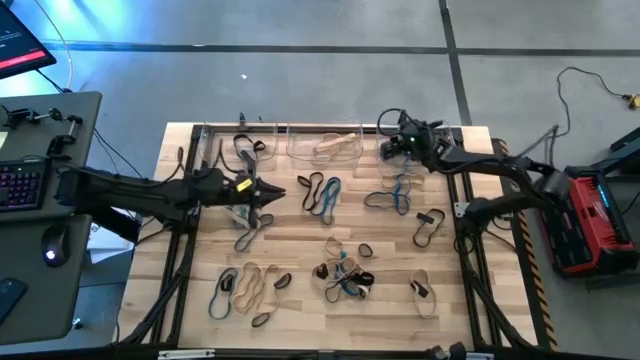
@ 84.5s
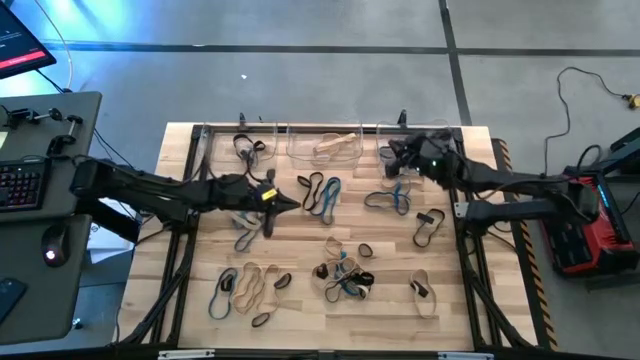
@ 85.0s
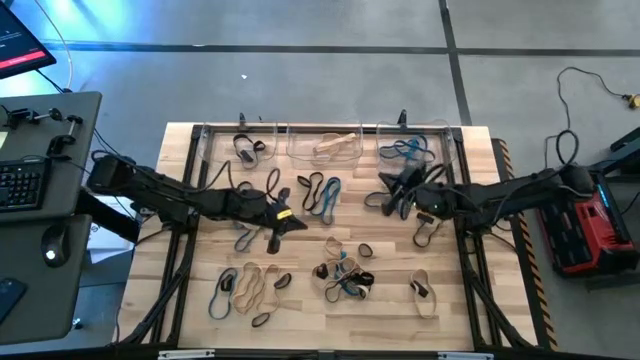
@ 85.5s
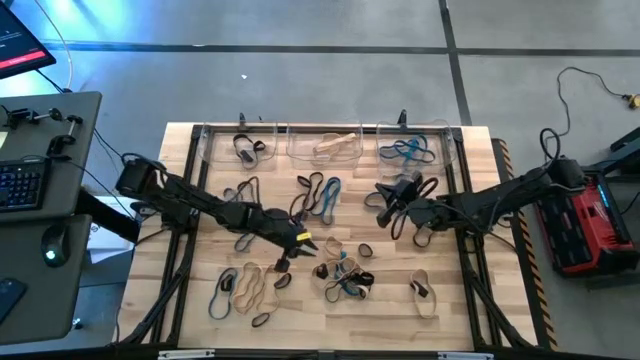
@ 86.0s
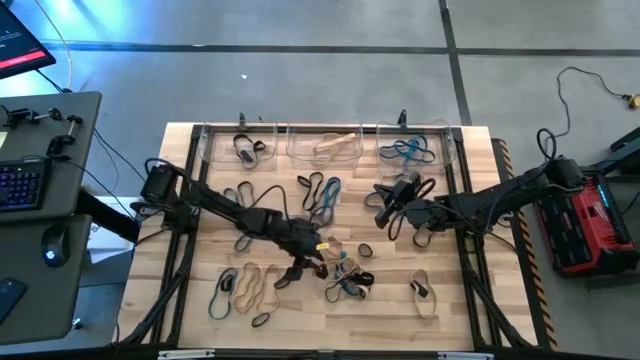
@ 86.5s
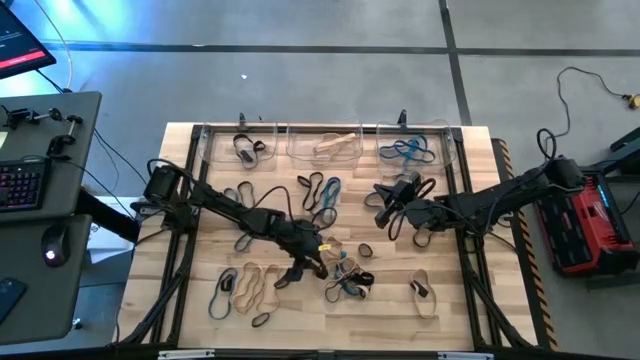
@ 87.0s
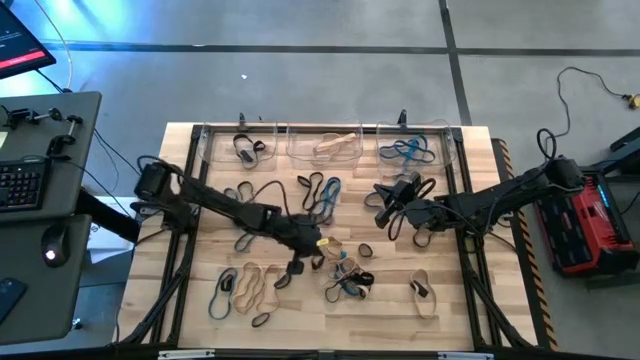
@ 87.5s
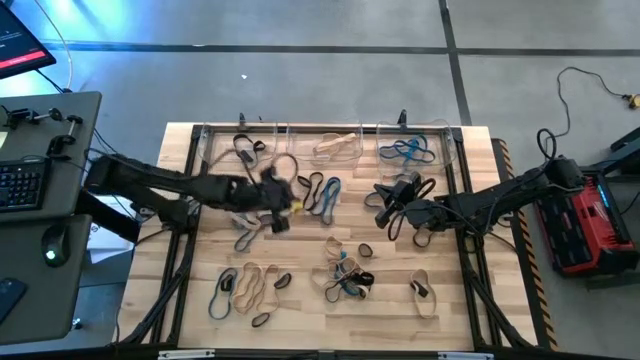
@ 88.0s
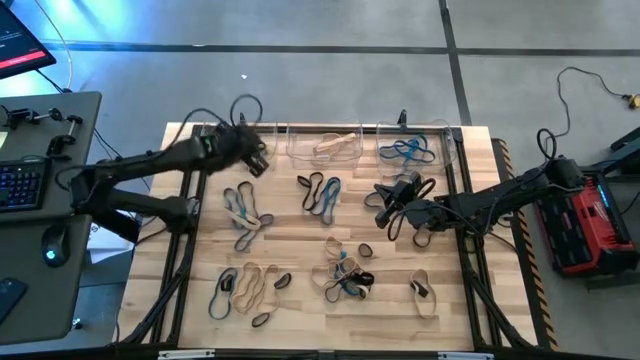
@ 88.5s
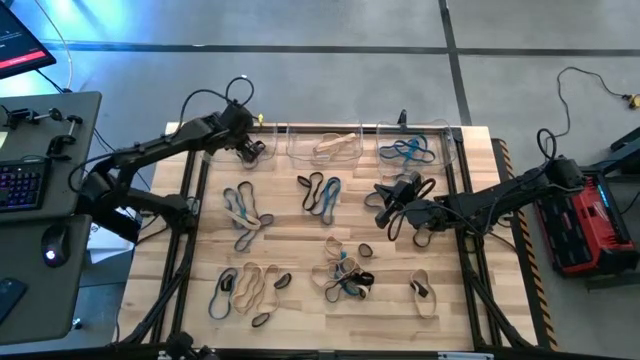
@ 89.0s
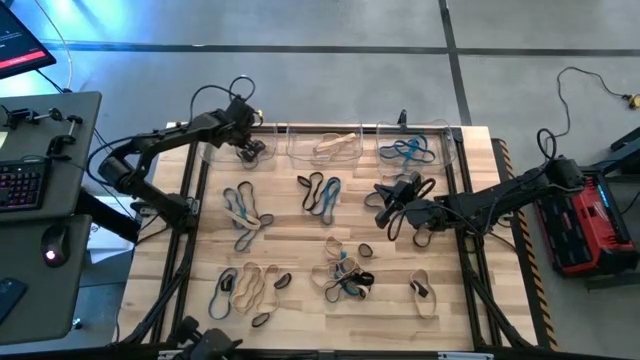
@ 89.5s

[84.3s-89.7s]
Task: Sort rubber bands into baskets
Put the black rubber band into the left transparent bin

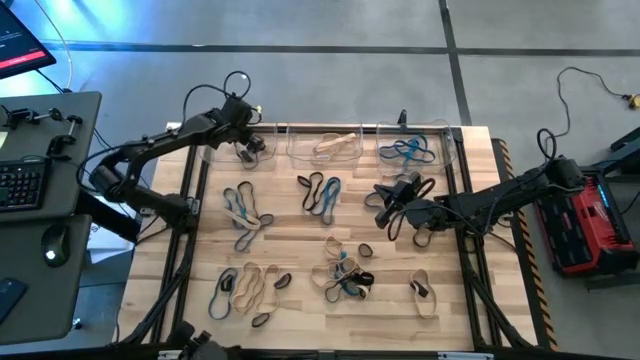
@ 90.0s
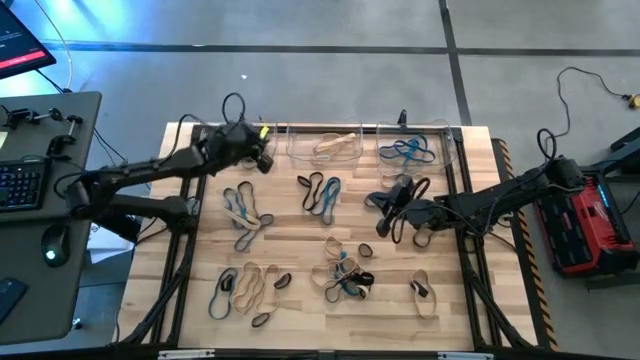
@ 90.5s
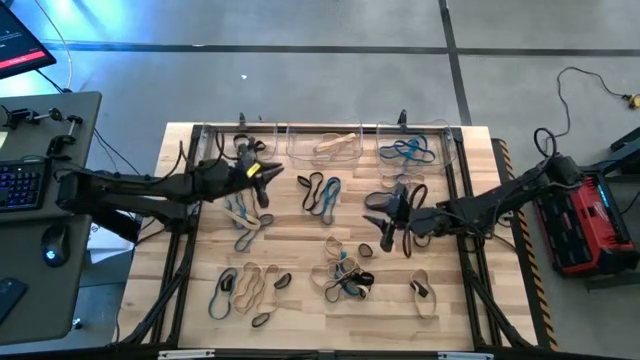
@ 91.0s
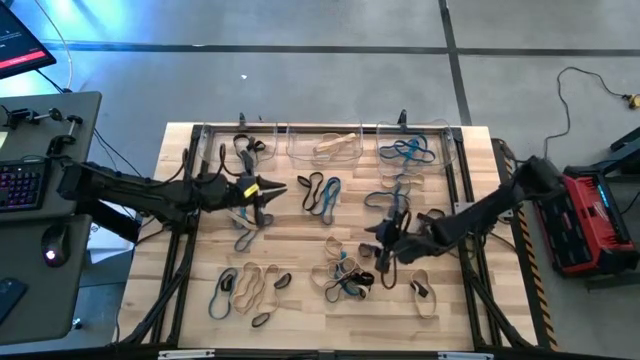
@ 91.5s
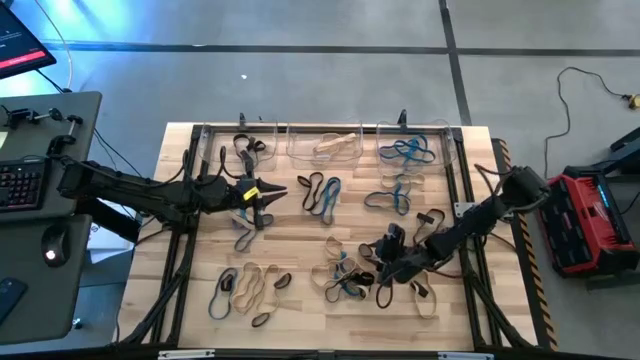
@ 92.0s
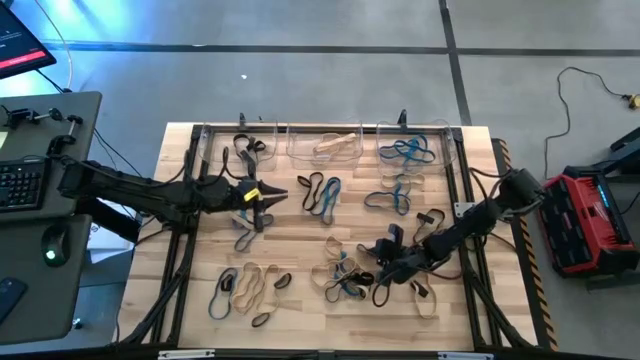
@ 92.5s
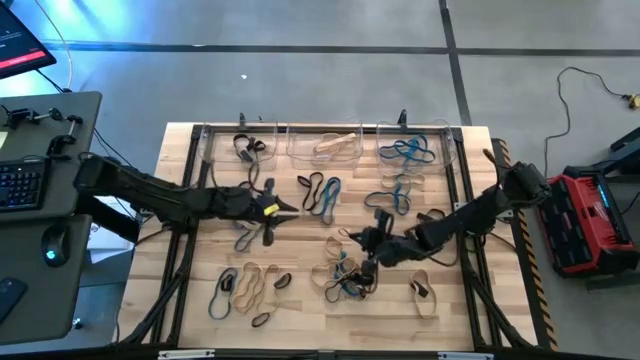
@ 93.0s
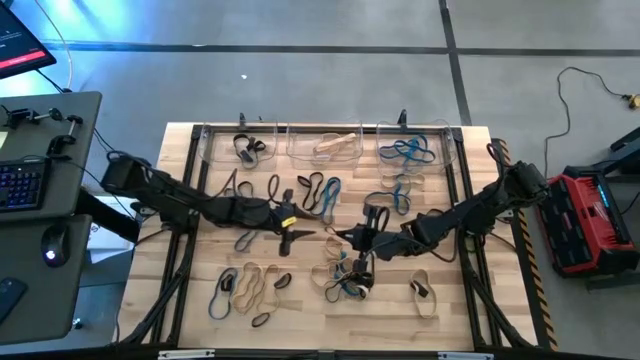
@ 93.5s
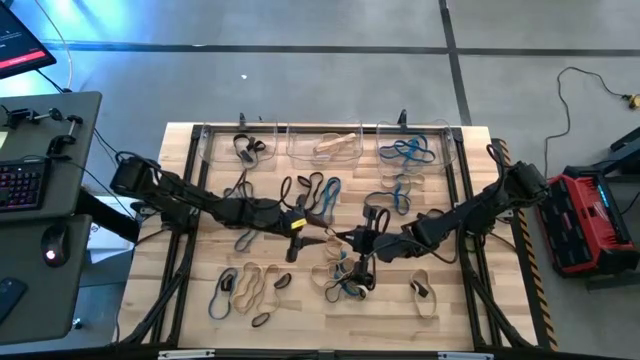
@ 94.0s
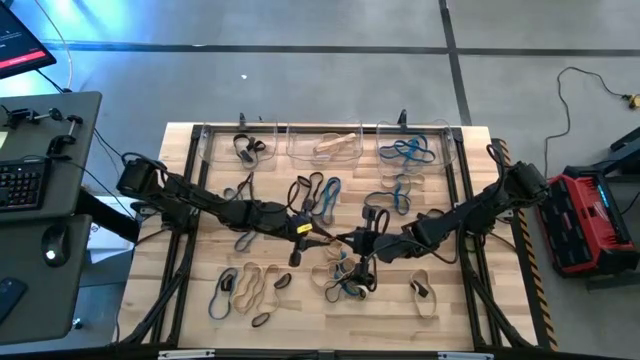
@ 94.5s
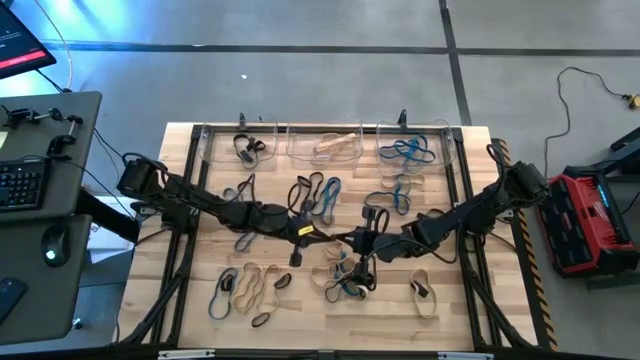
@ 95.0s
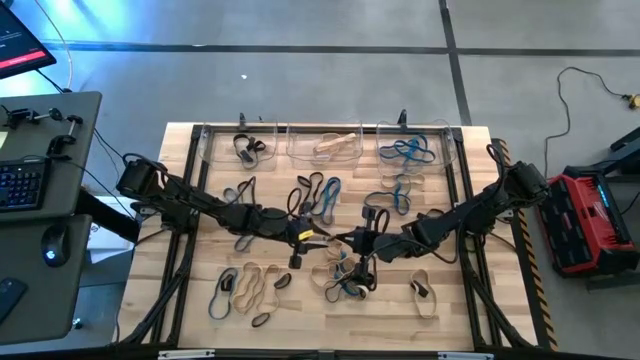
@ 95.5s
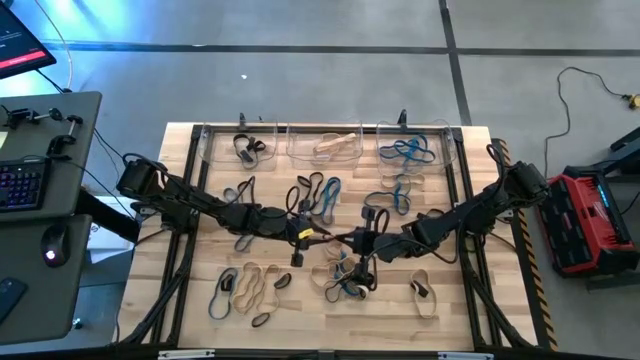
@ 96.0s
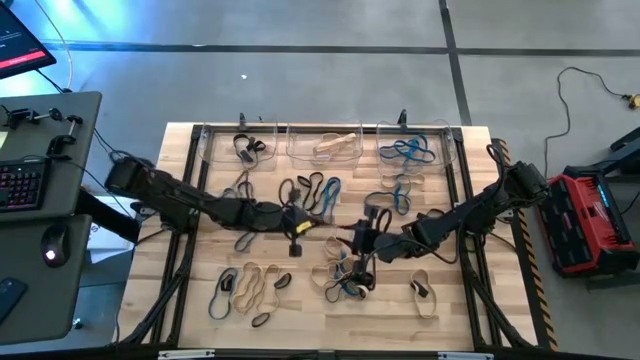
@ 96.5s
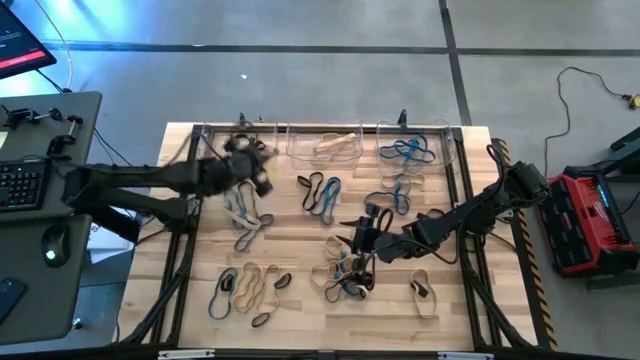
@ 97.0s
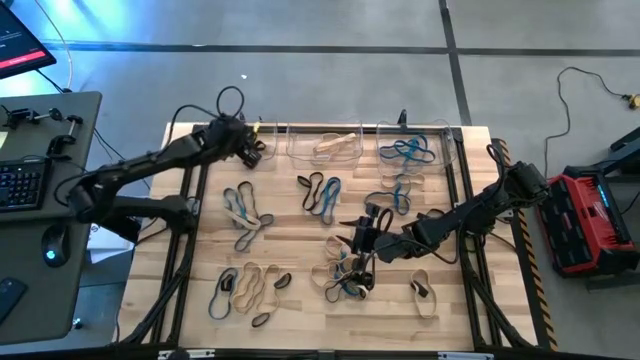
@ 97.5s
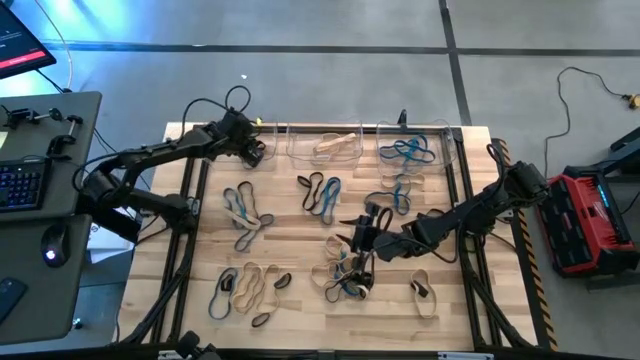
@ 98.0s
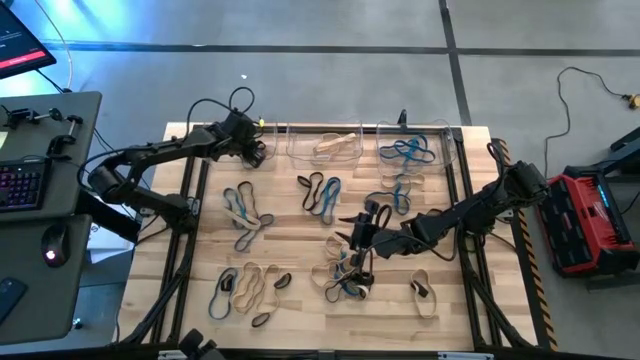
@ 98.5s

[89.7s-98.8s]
Put the black rubber band into the left transparent bin

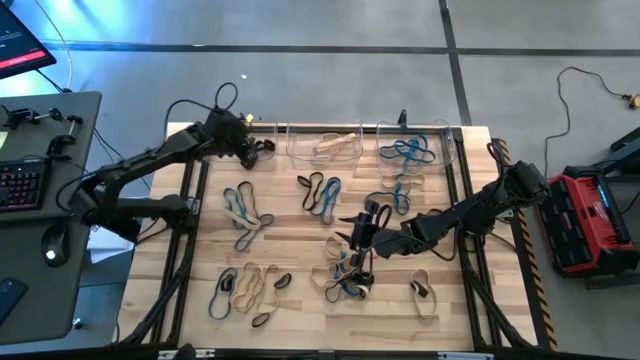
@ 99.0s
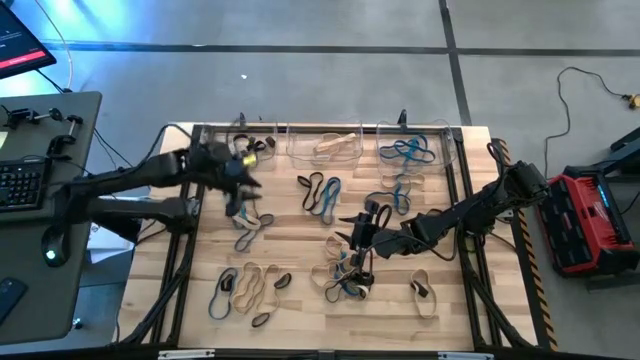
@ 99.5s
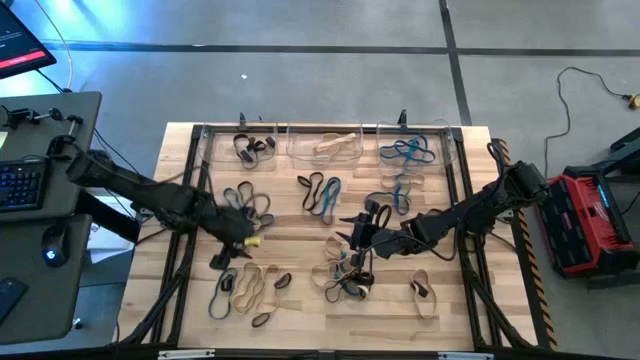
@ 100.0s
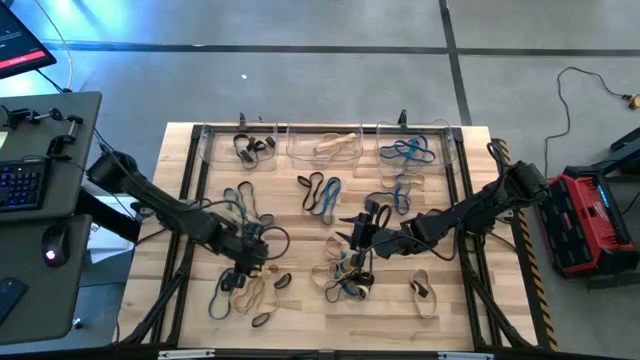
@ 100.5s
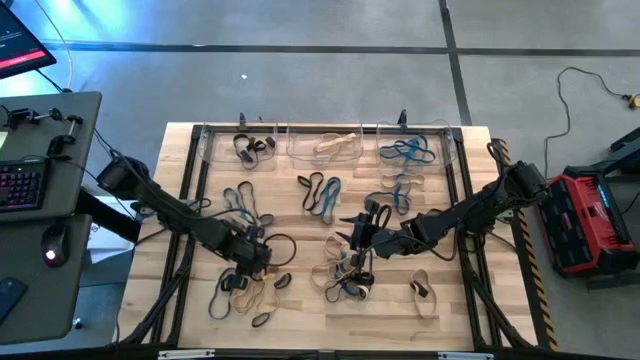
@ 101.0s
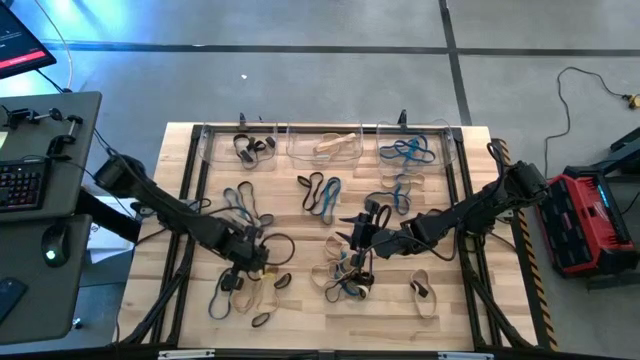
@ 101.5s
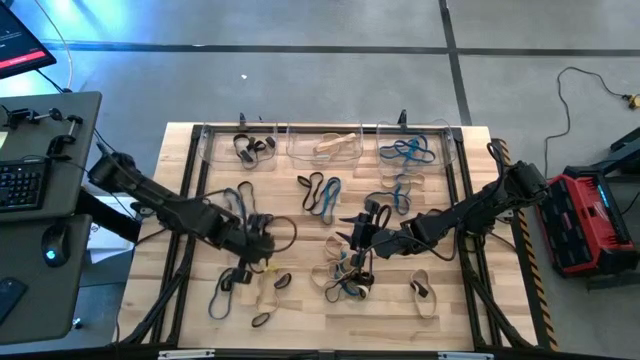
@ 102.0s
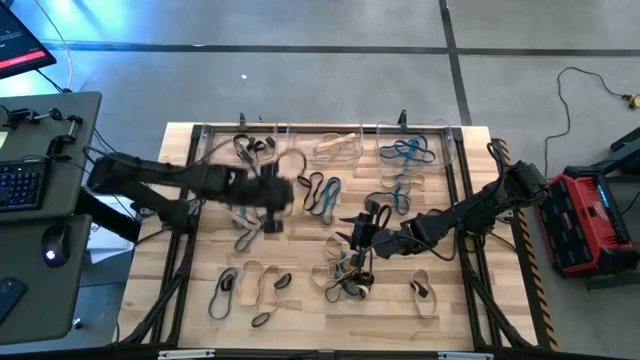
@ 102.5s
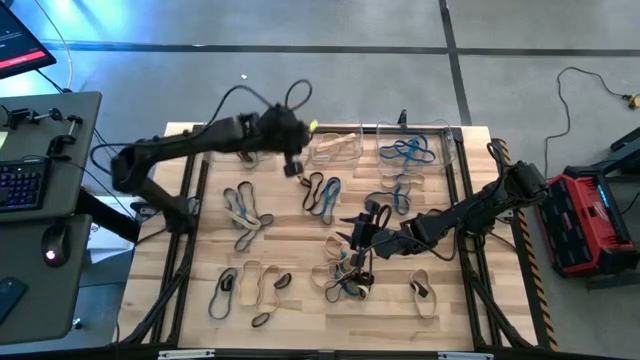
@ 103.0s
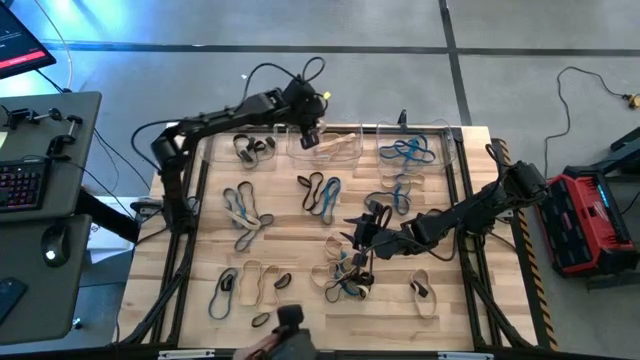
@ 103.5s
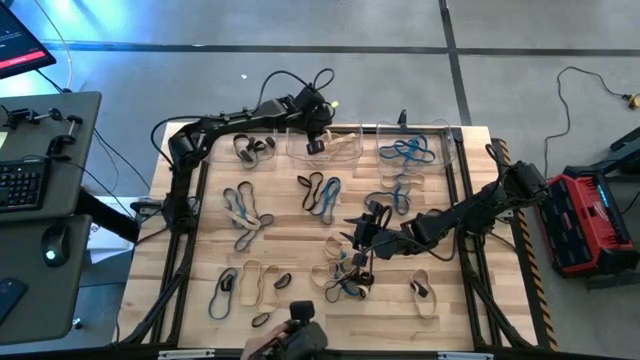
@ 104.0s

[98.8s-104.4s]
Put the brown rubber band into the middle transparent bin

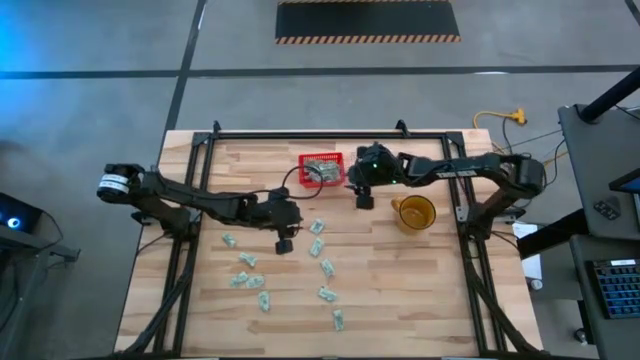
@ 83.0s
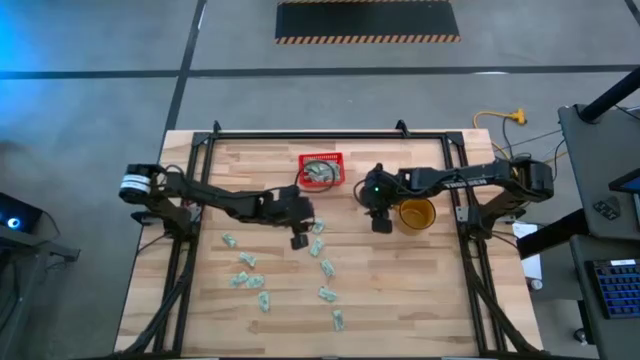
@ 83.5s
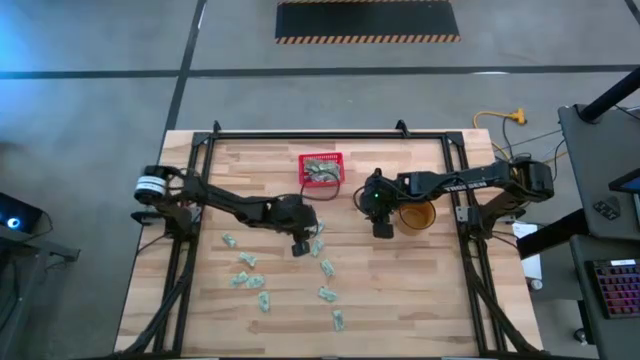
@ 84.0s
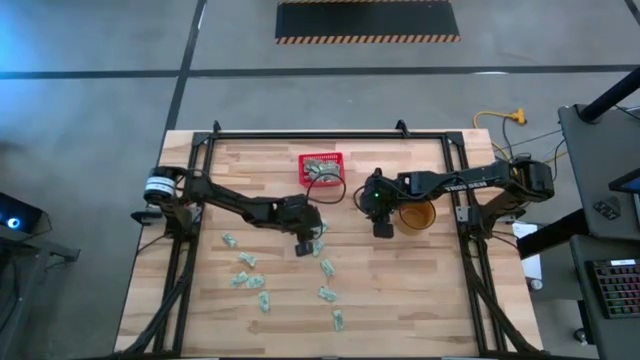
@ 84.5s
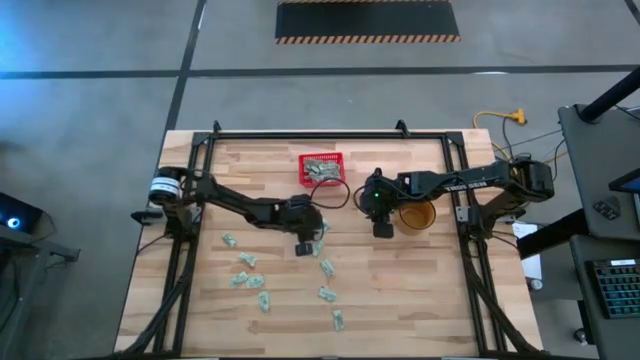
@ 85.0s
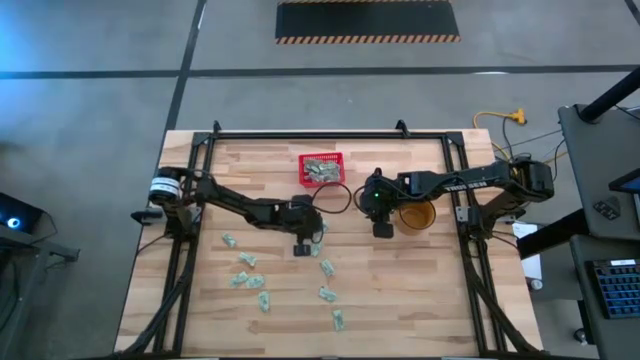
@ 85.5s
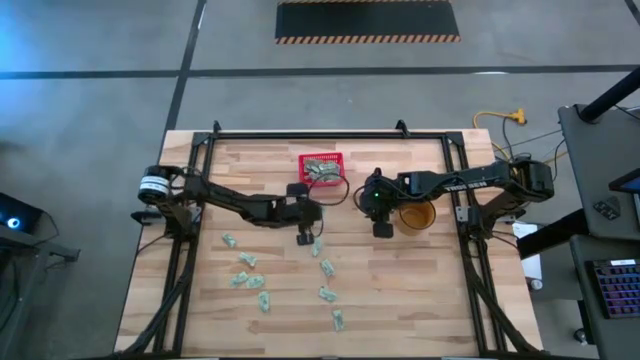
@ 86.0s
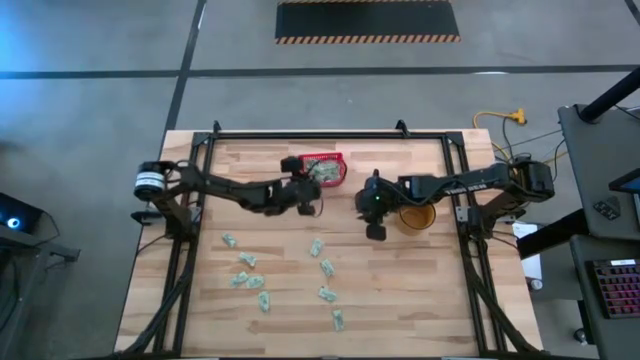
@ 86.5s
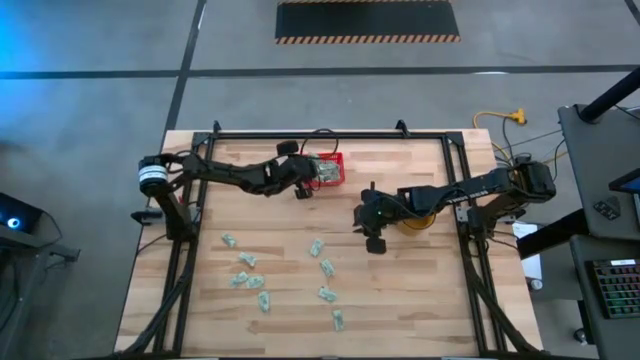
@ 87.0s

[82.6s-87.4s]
Task: Pick and place Stevia / Truvia into bins
Put the white stevia packet into the red bin
